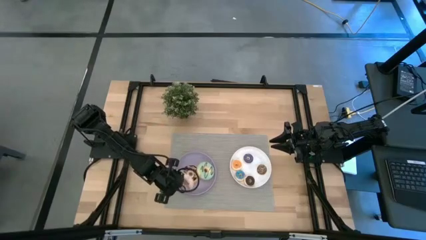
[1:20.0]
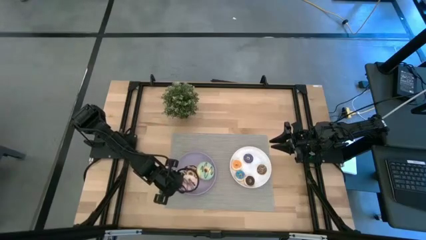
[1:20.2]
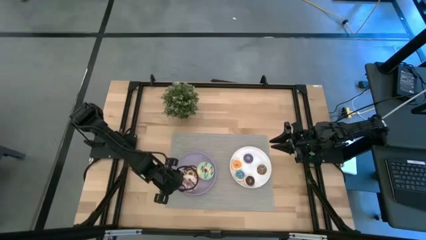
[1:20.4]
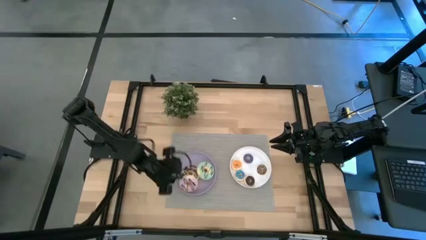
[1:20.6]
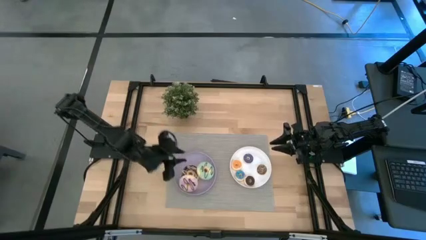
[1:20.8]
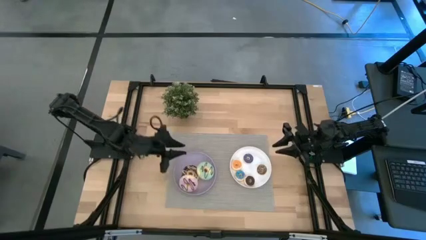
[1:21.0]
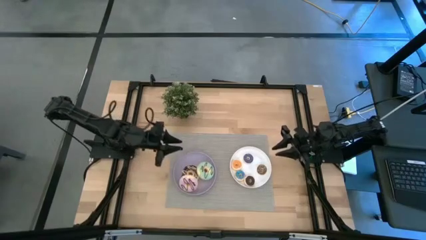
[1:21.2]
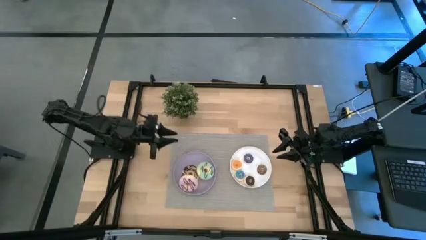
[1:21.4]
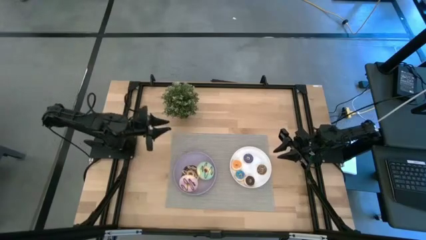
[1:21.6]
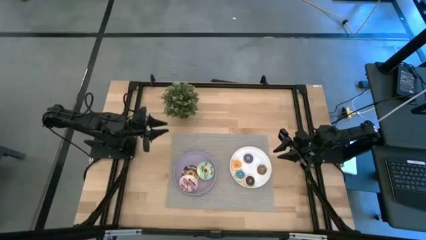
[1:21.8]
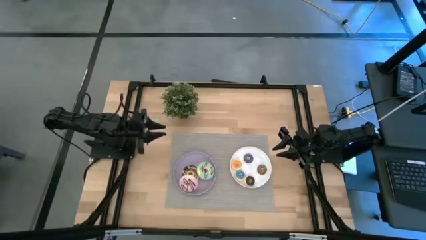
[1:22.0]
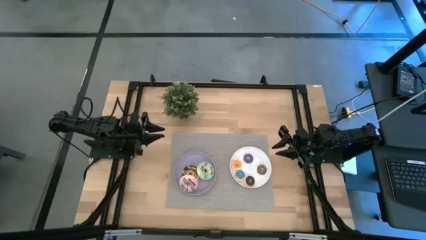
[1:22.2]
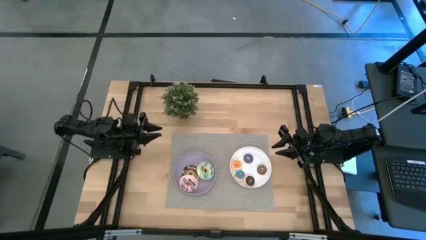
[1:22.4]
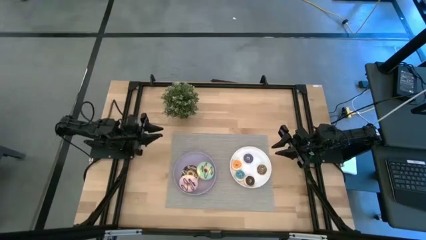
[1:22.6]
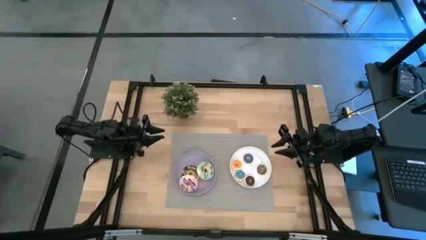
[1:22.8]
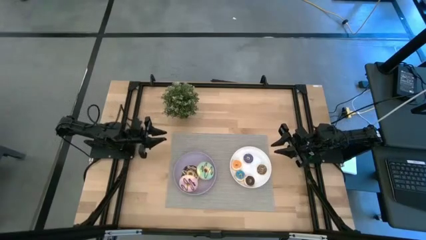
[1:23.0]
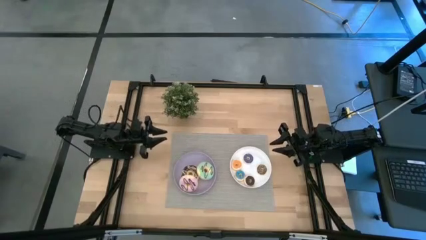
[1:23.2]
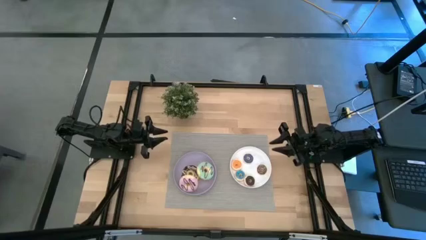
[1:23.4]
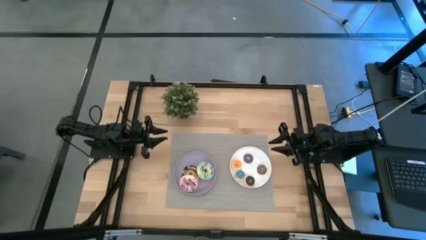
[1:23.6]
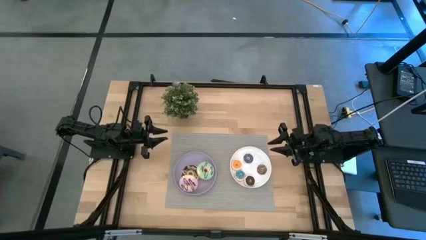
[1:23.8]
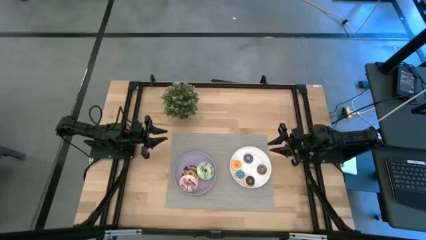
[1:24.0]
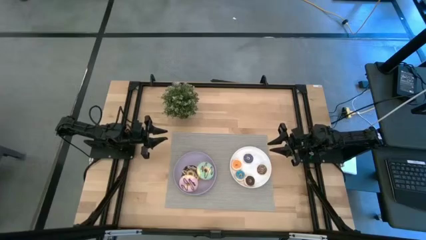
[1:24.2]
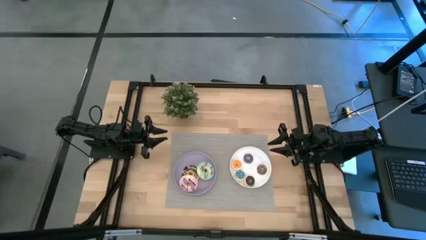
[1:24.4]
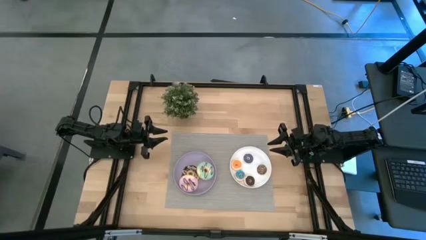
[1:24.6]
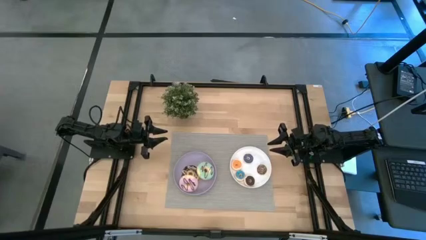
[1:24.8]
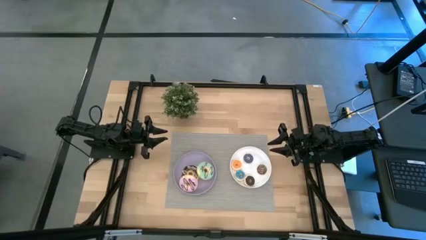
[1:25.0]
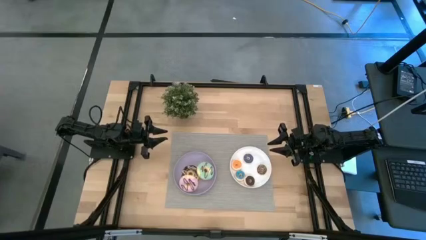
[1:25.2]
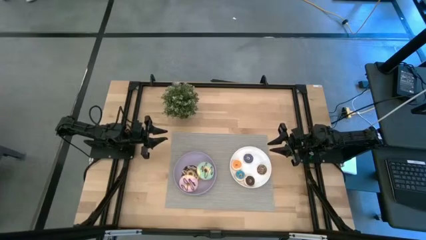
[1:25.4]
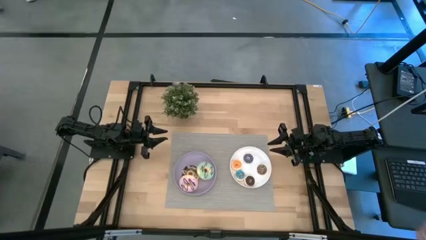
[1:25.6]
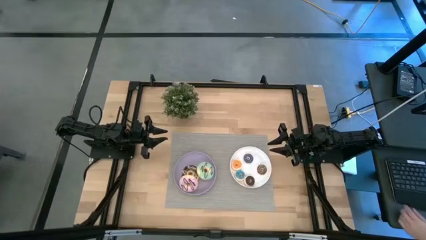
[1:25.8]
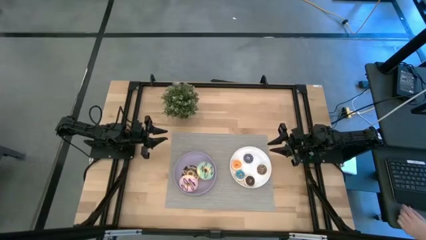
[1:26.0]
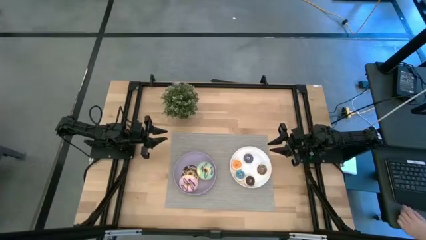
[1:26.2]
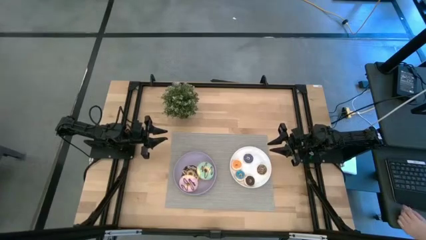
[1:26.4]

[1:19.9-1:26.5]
Task: Pick & Place donuts
Return to Home Position

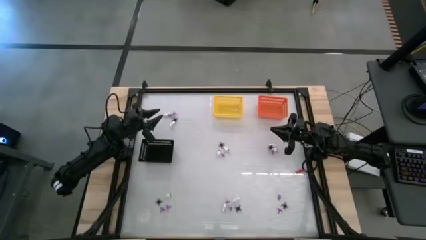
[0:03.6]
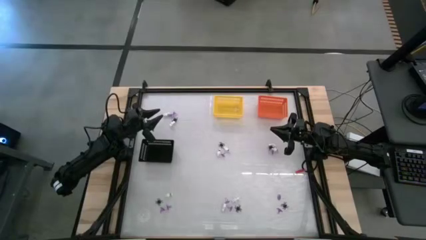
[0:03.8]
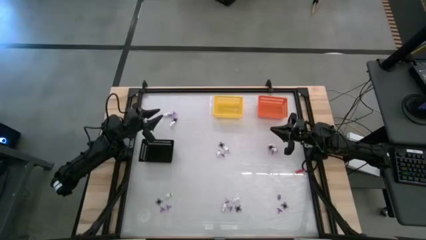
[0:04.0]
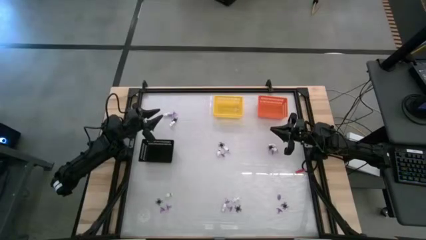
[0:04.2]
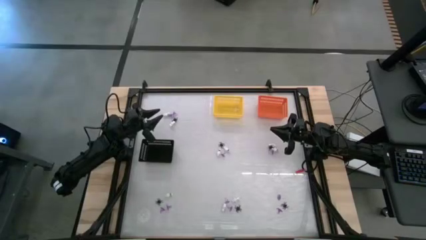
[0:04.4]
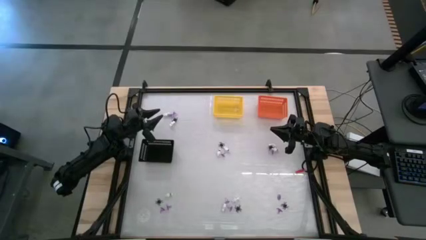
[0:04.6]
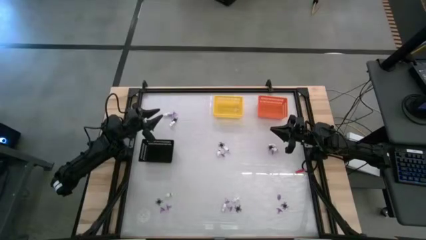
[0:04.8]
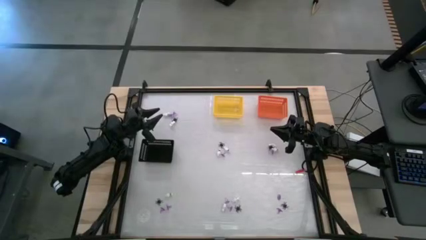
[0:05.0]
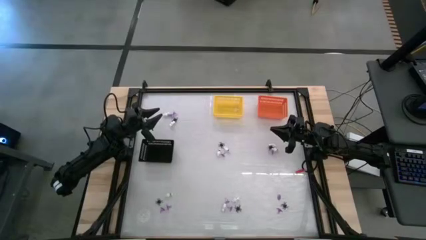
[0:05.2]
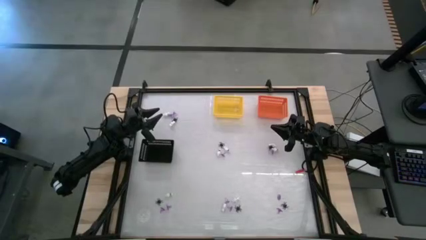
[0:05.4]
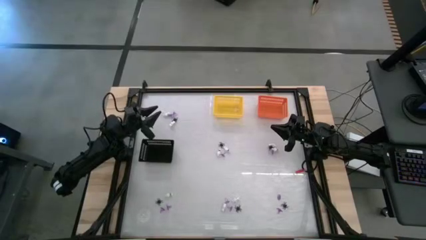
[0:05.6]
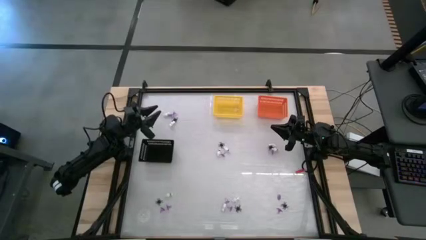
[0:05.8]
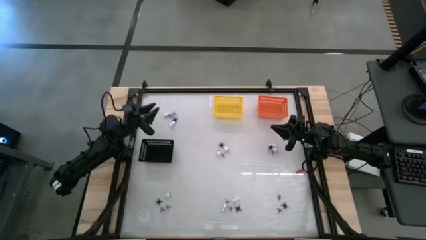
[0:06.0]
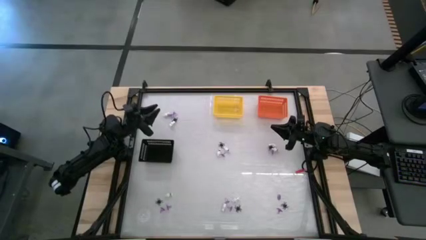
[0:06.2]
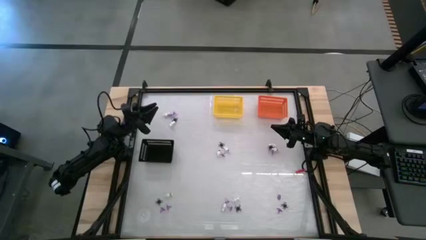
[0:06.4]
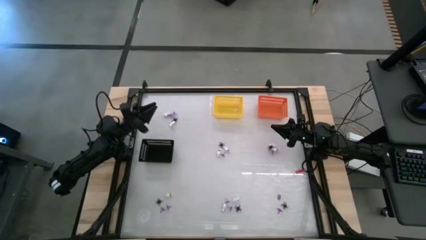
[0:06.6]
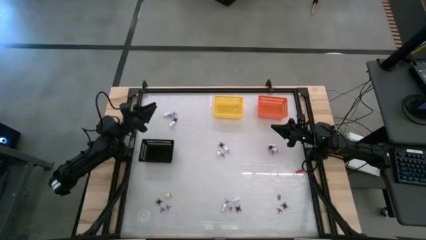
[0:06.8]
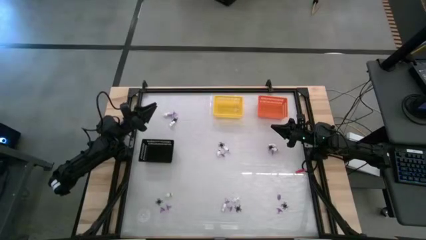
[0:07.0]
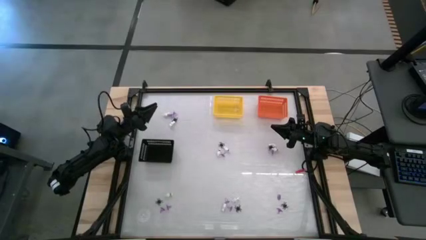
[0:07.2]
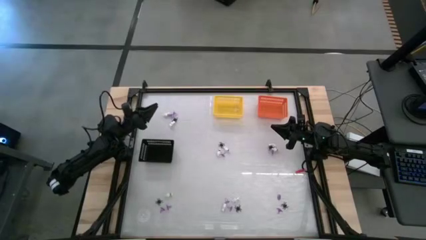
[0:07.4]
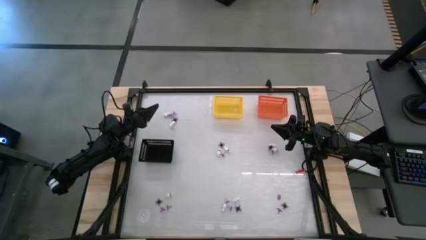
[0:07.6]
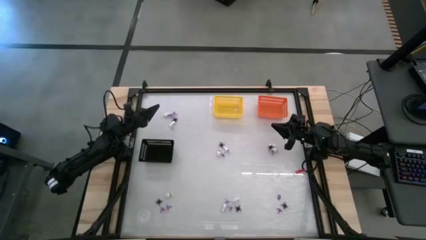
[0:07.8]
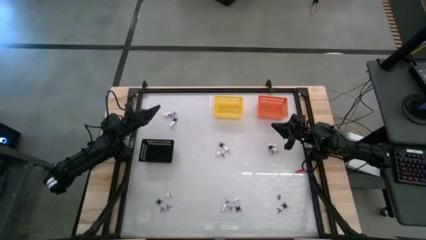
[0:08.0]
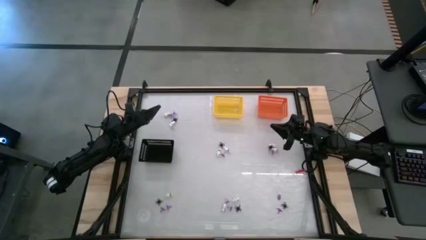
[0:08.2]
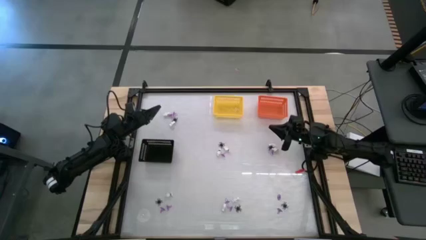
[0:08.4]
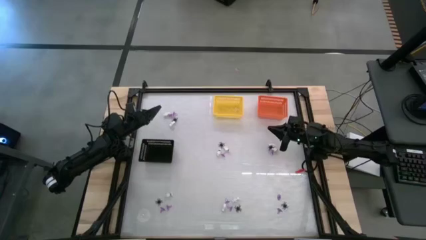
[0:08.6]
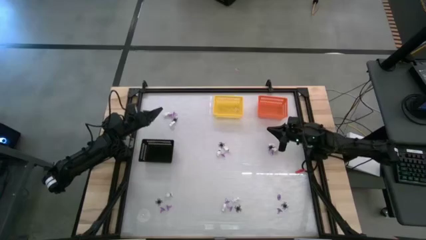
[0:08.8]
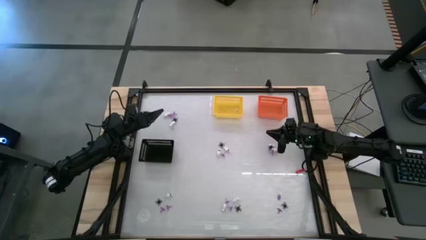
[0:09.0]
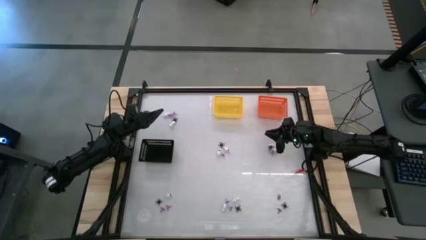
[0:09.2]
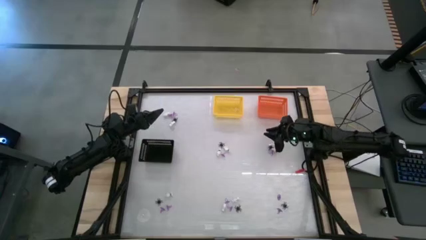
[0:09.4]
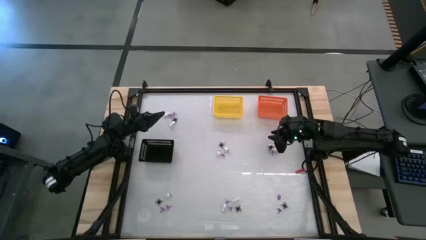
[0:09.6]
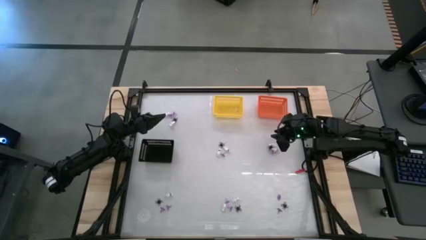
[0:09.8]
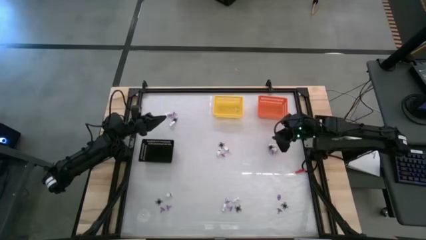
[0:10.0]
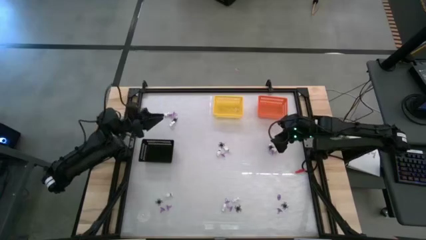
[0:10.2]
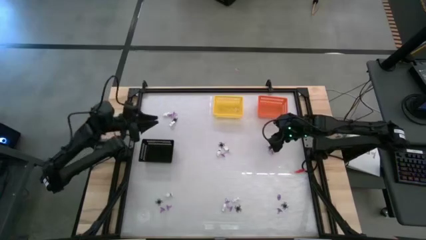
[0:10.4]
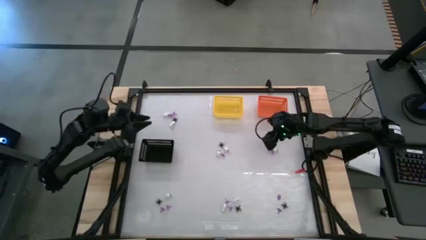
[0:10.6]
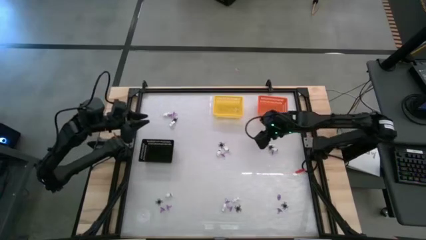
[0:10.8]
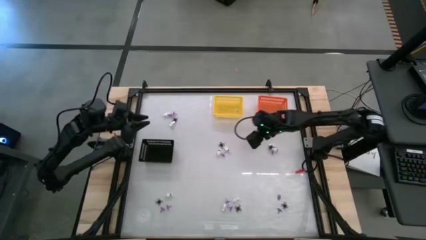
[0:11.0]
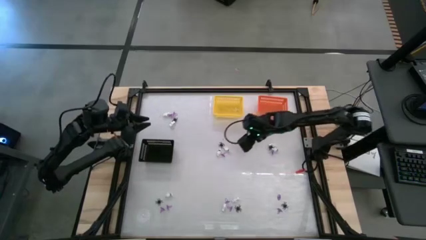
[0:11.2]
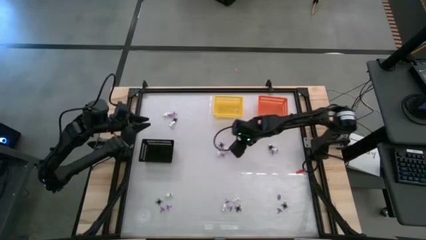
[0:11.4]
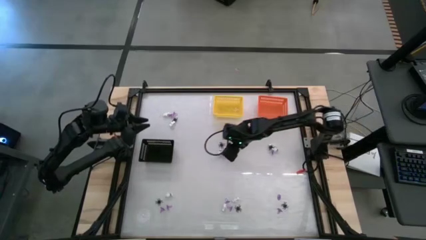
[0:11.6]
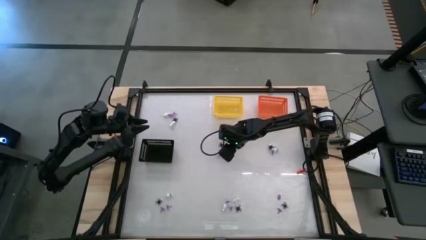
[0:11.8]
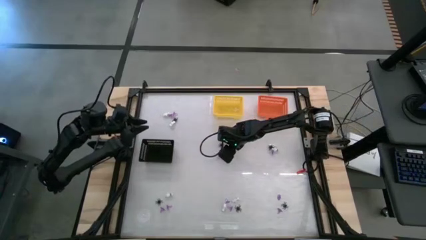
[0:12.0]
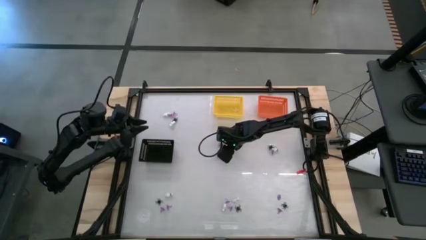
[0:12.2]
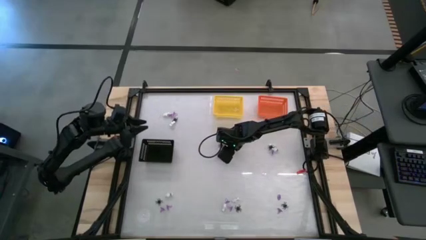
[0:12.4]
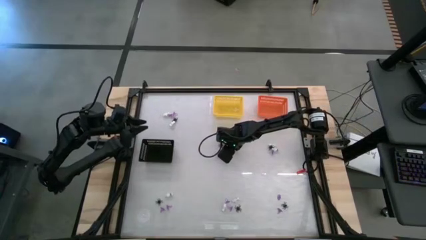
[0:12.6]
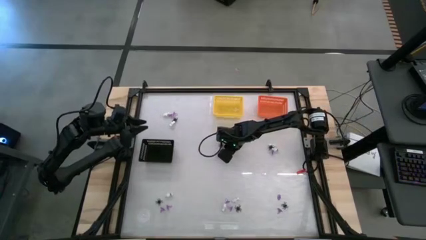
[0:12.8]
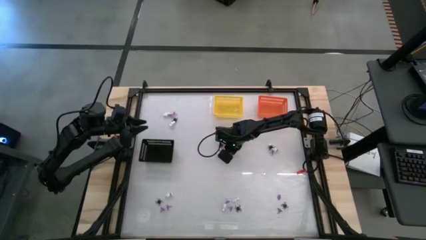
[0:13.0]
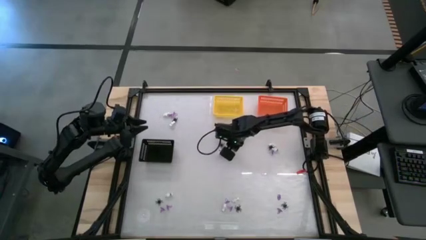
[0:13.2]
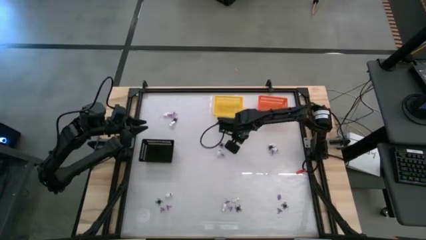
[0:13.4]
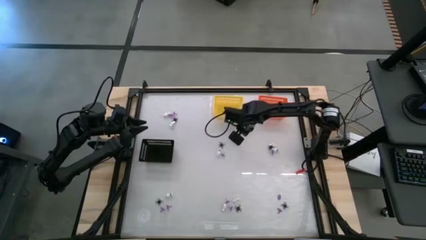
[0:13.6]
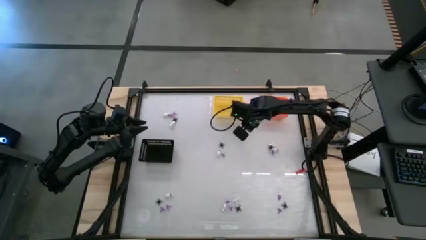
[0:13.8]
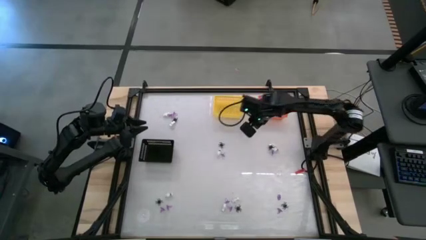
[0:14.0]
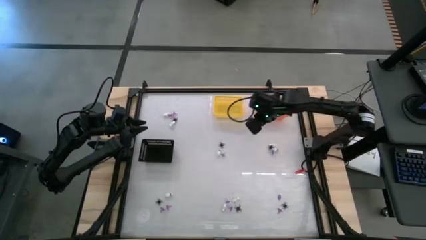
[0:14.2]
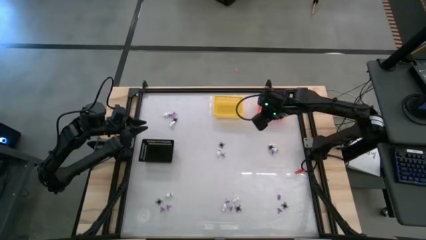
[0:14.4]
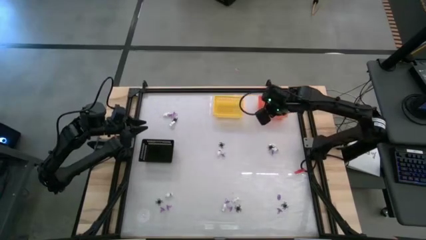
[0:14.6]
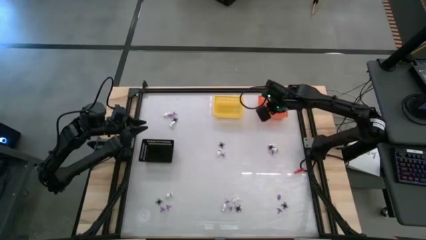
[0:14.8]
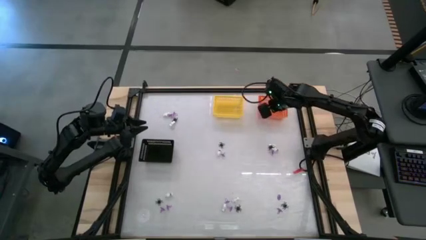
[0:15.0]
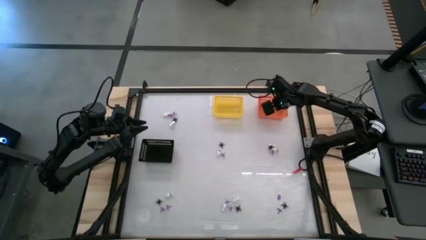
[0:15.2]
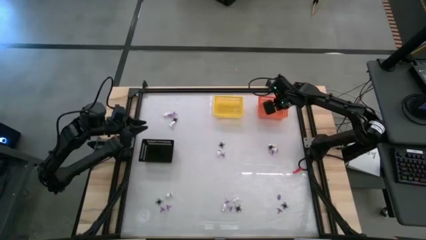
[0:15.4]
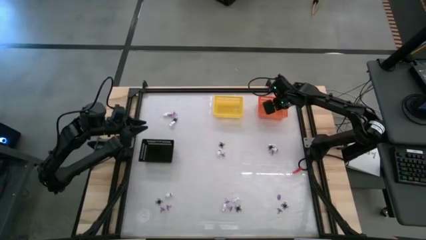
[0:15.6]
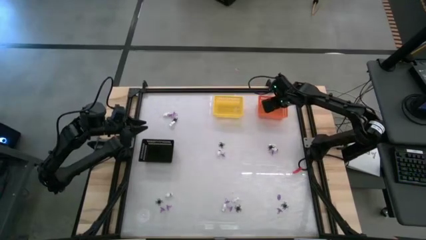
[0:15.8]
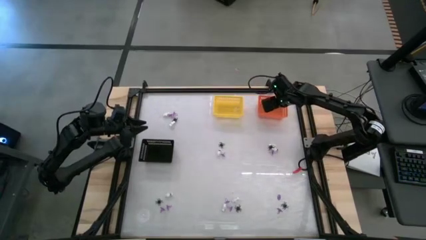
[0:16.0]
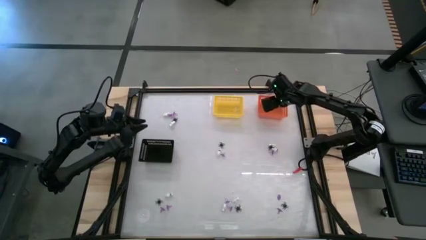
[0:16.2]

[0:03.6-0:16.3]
Task: Sort Halloween decoration
Put the white skeleton toy into the orange bin
